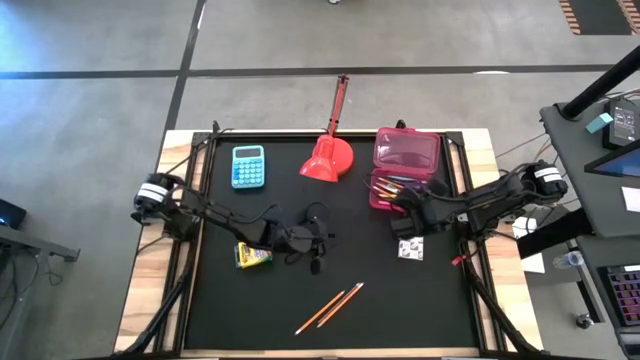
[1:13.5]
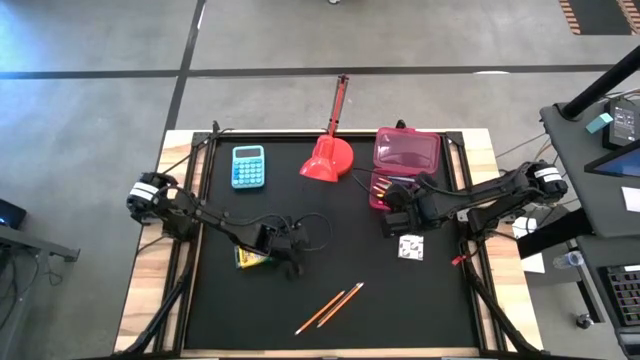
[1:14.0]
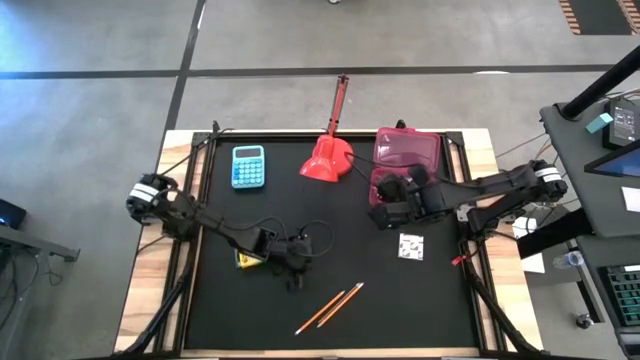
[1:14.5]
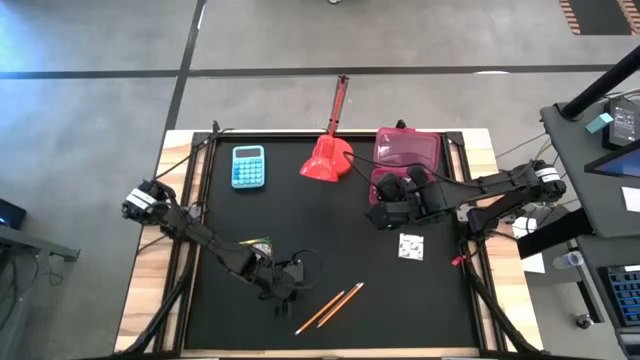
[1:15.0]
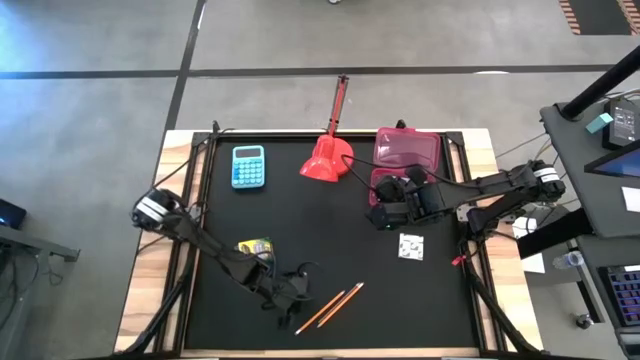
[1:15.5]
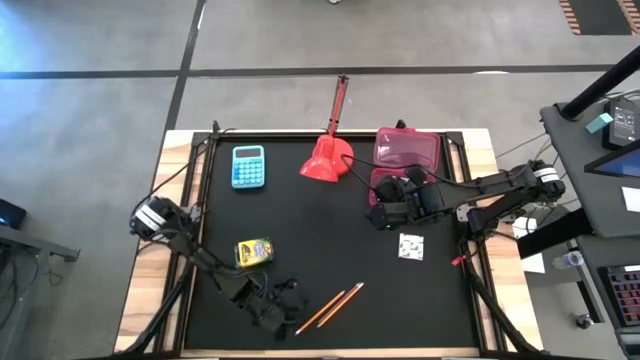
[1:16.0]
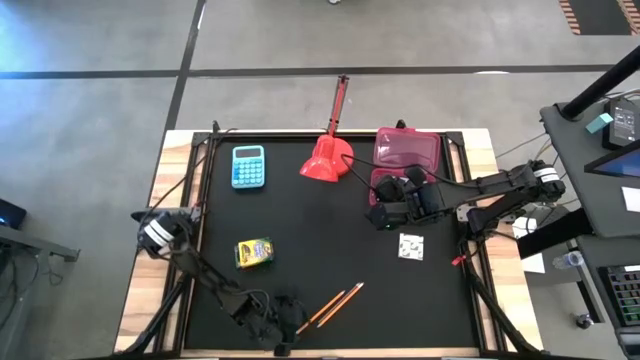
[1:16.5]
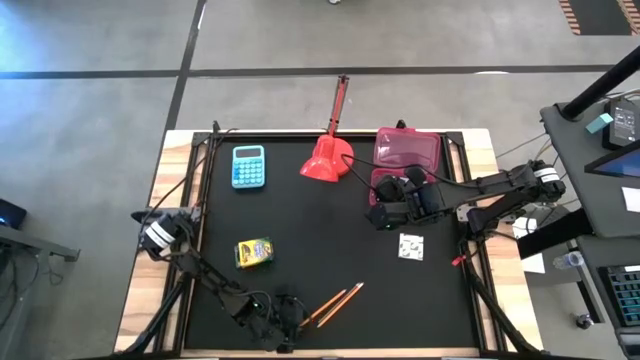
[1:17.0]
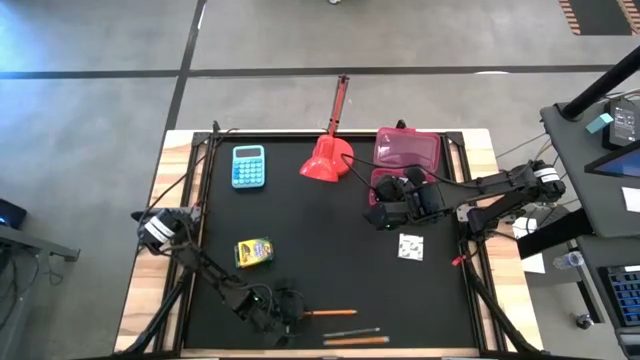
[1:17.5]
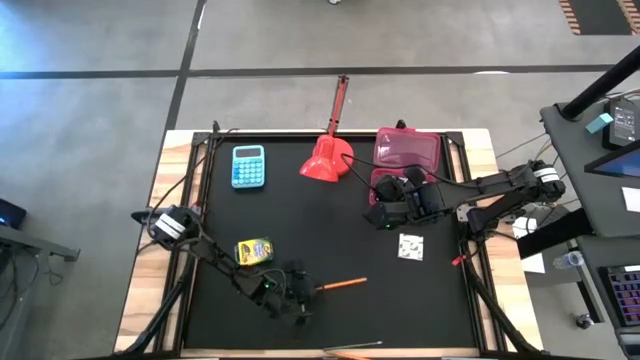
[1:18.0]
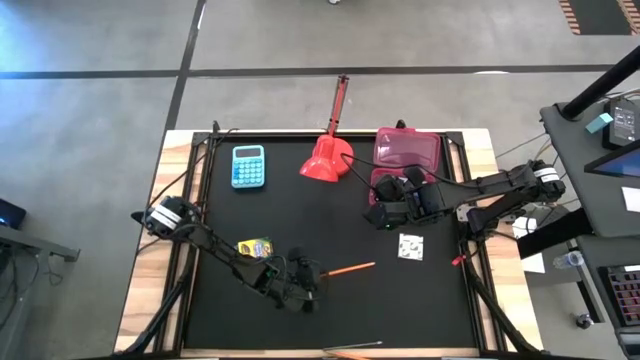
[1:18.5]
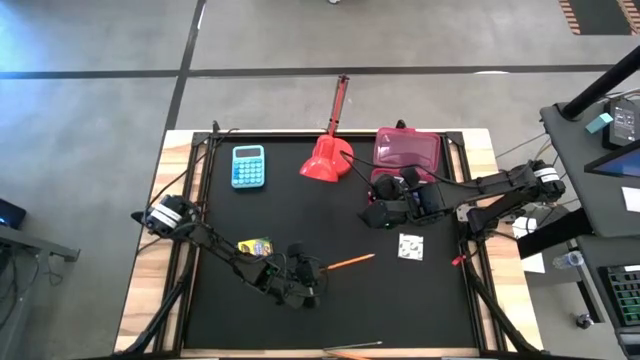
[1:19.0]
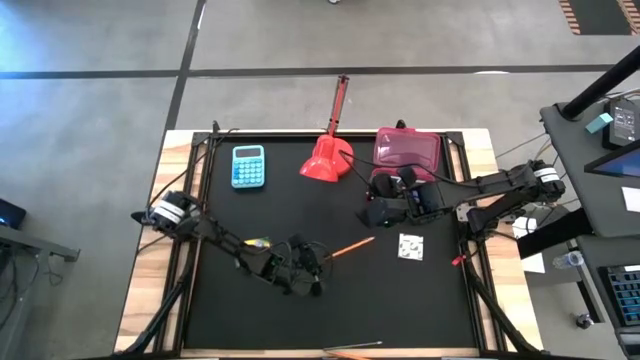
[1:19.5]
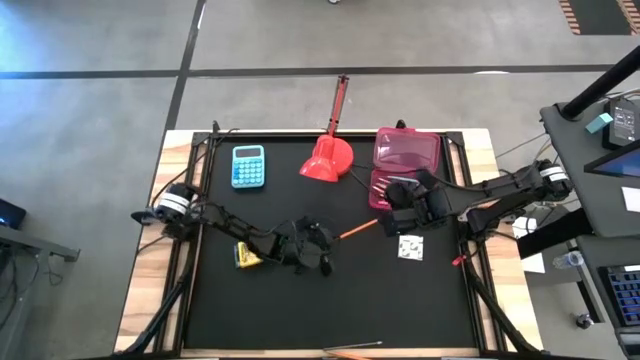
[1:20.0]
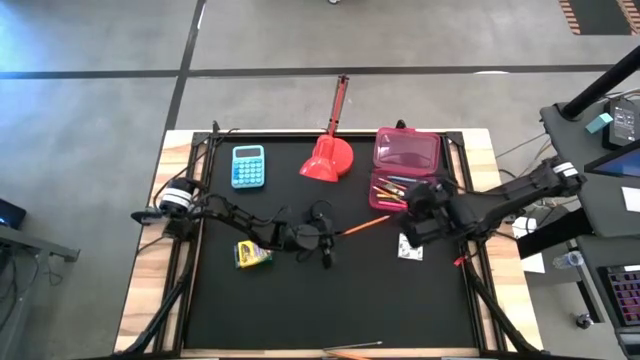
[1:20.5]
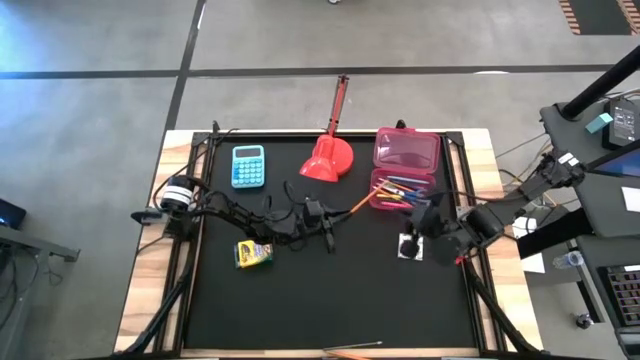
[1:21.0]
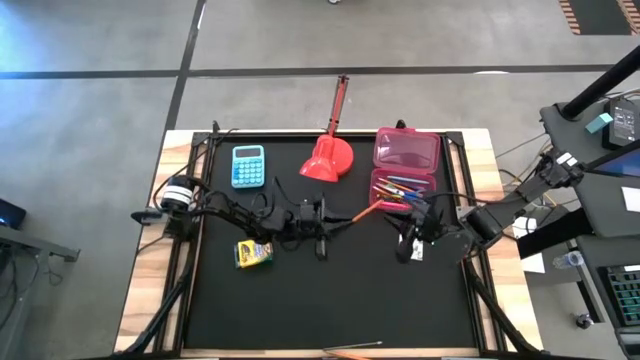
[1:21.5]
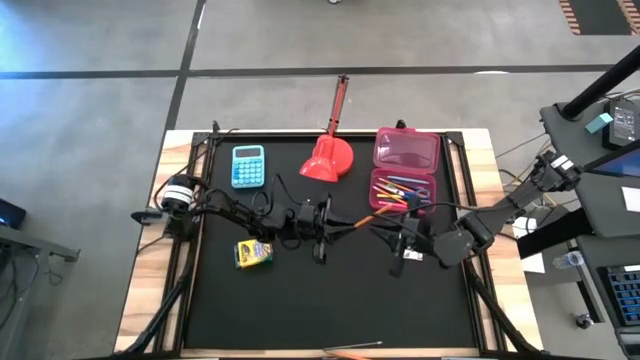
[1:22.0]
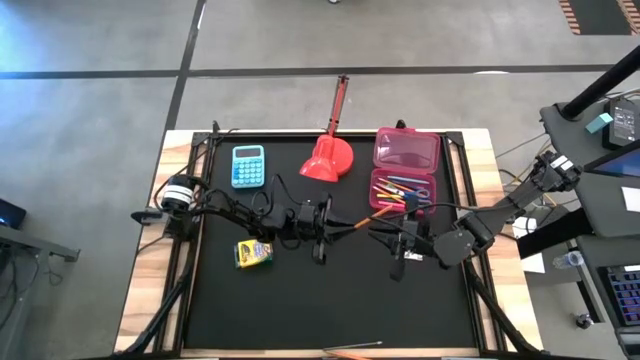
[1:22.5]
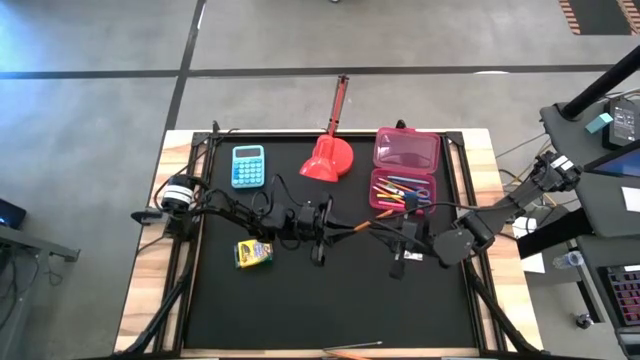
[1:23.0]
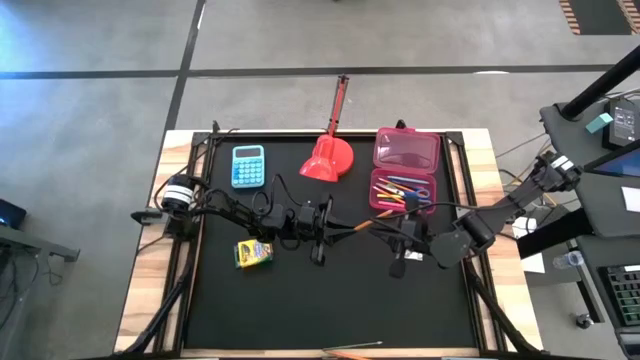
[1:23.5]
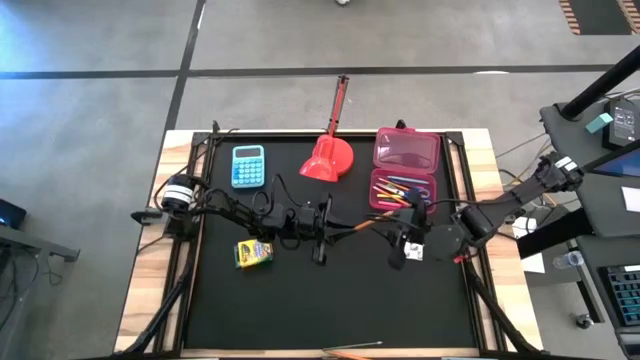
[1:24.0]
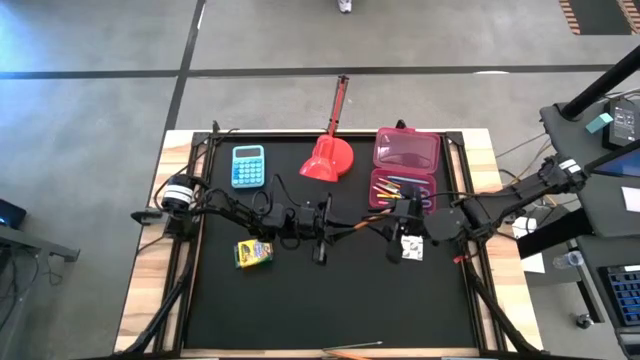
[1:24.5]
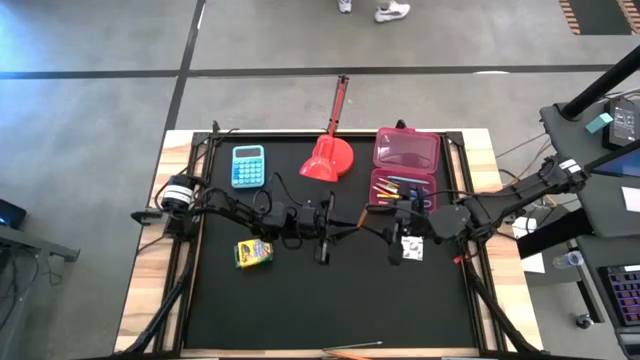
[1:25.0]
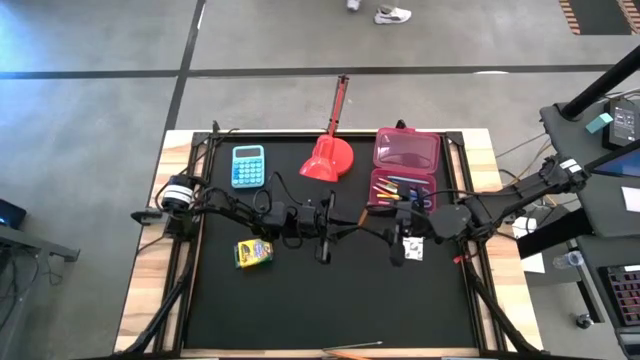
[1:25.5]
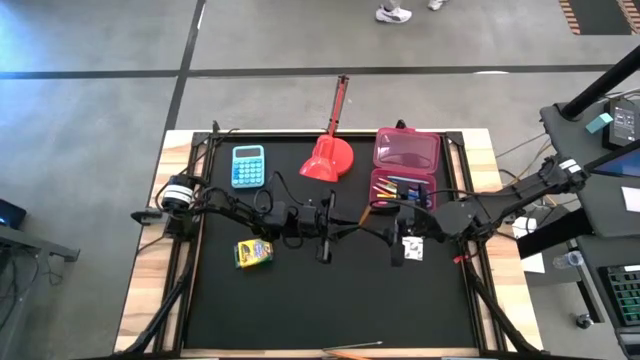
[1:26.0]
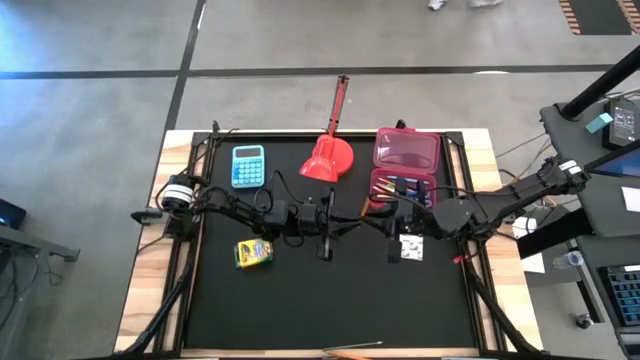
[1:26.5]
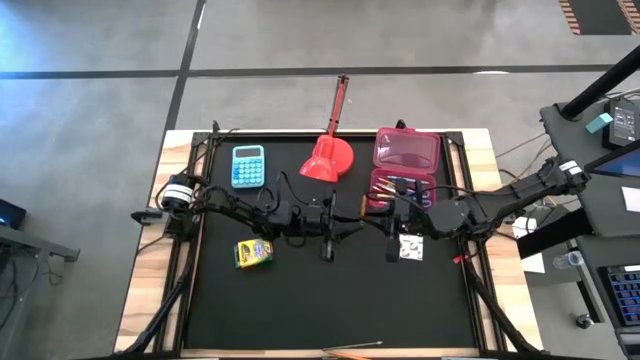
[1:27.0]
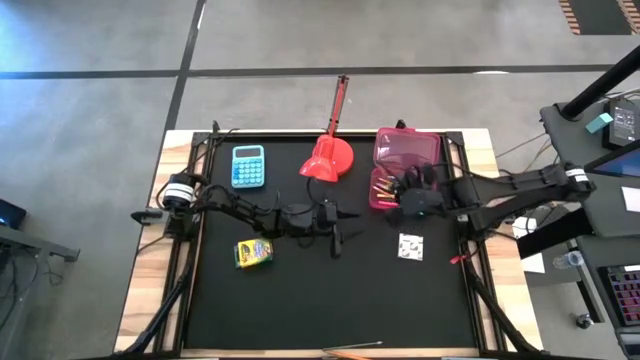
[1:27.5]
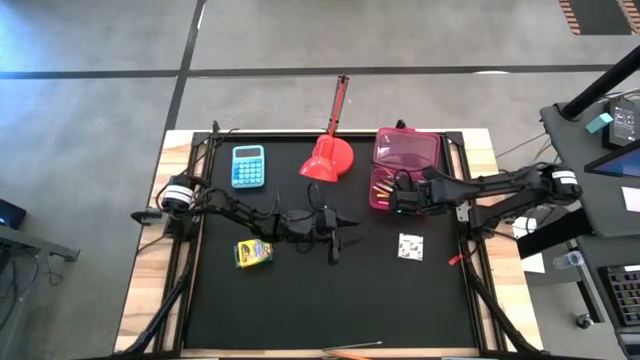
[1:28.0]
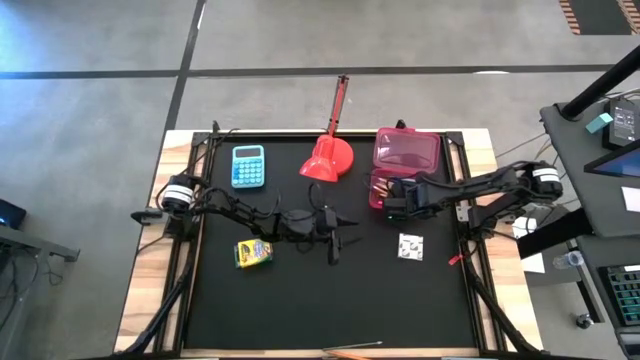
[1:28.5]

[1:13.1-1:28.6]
Task: Pack school essentials
Put the orange pencil into the pink supply box

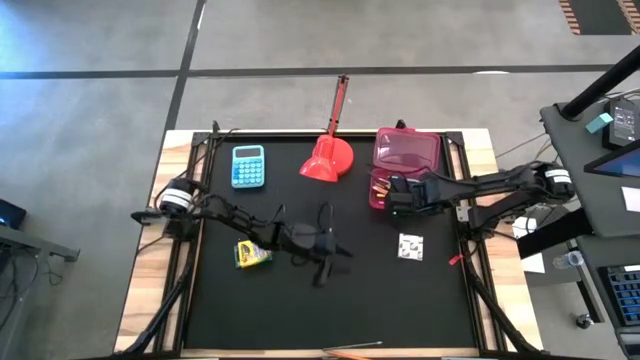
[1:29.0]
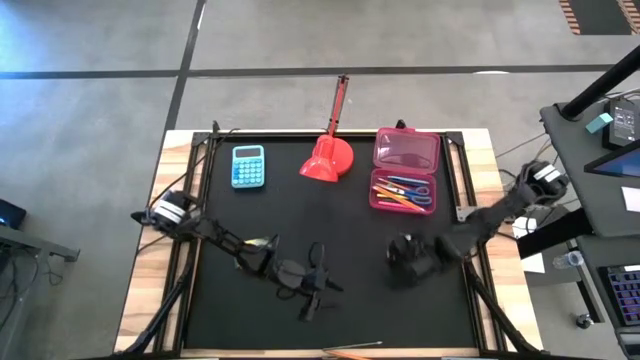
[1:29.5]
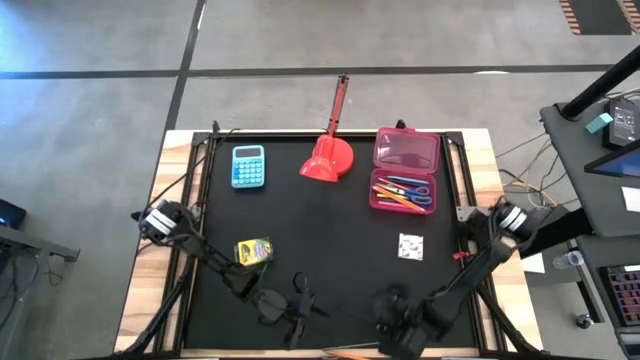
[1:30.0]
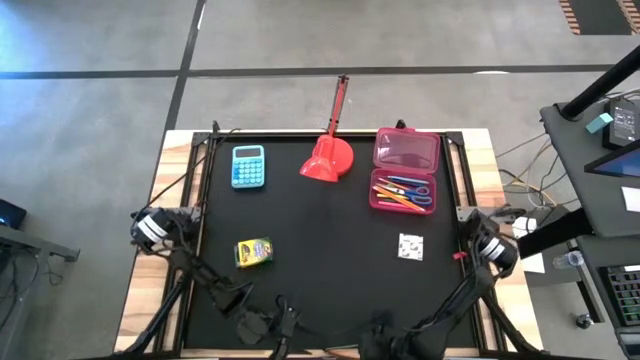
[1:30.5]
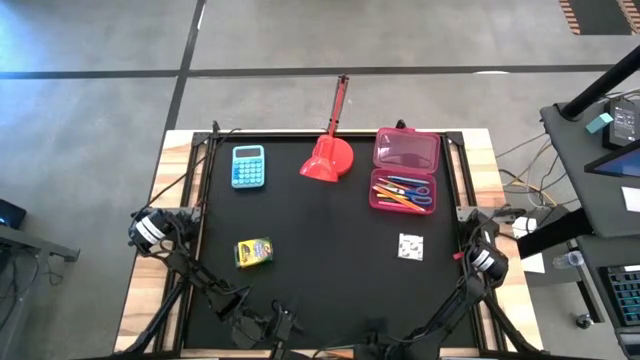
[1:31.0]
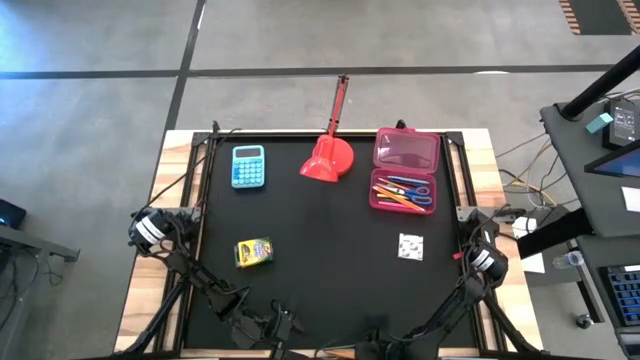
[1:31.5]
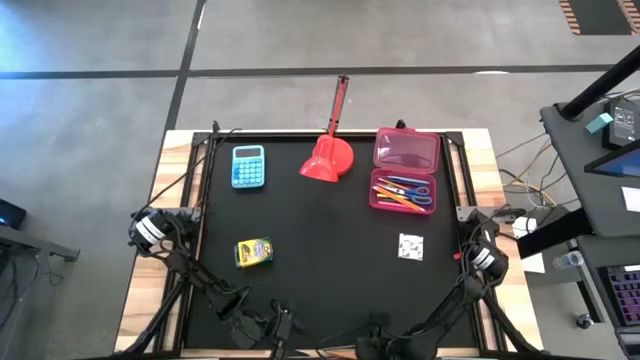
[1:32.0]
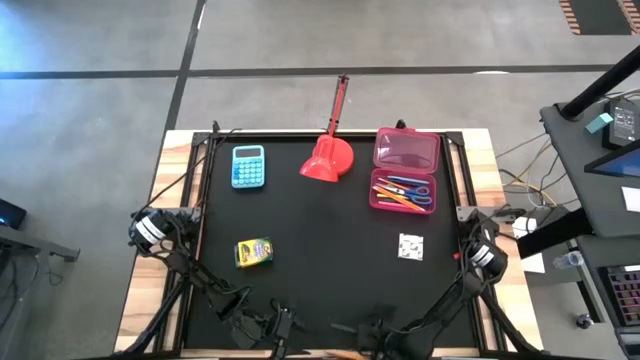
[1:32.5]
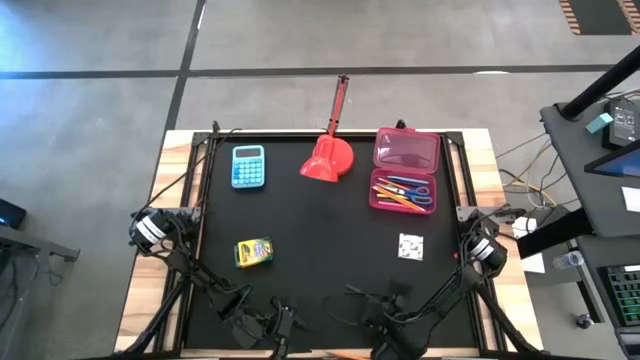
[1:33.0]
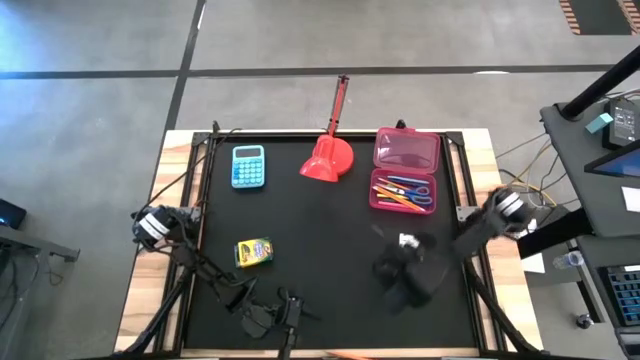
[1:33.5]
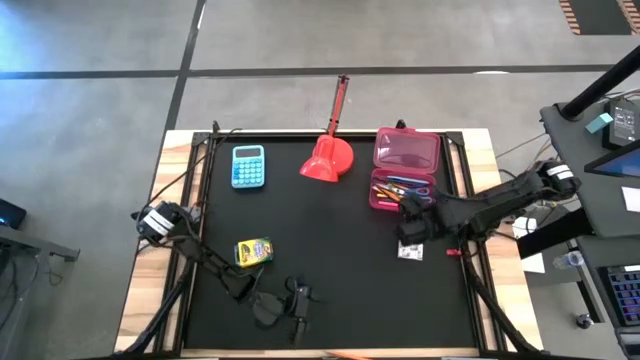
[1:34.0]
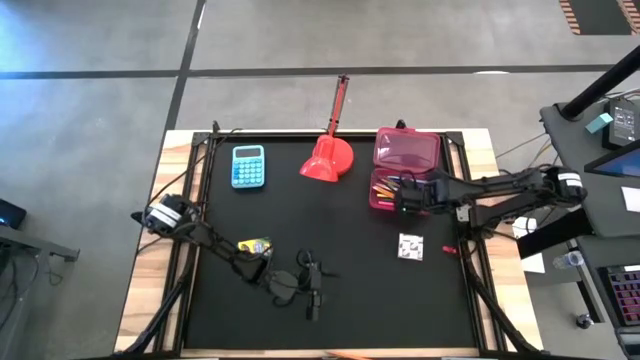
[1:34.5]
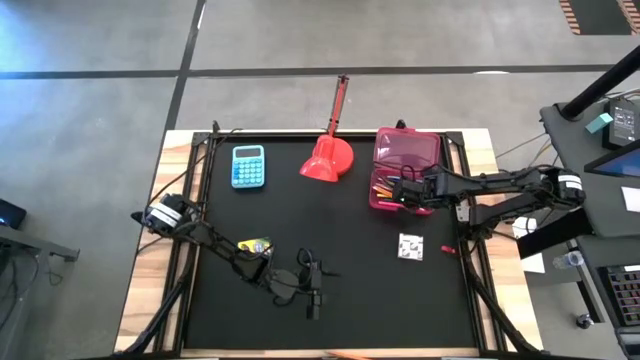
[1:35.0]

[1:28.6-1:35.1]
Put the black pencil into the pink supply box
